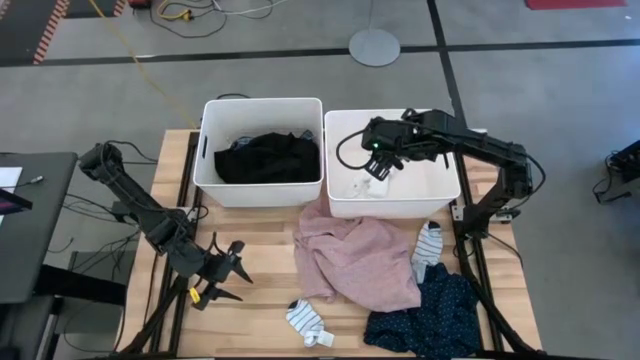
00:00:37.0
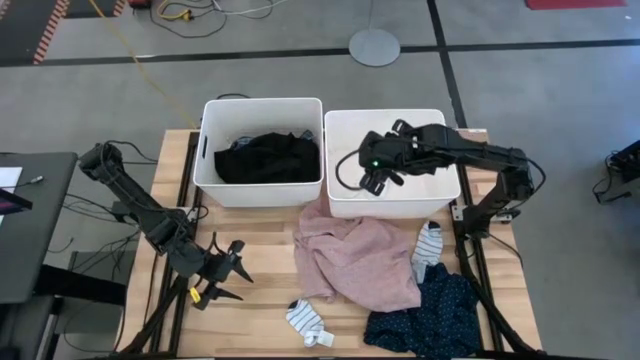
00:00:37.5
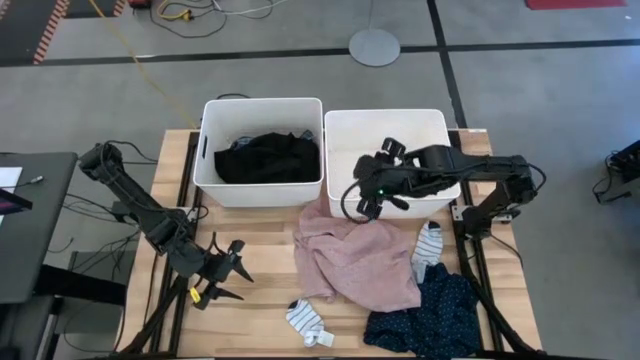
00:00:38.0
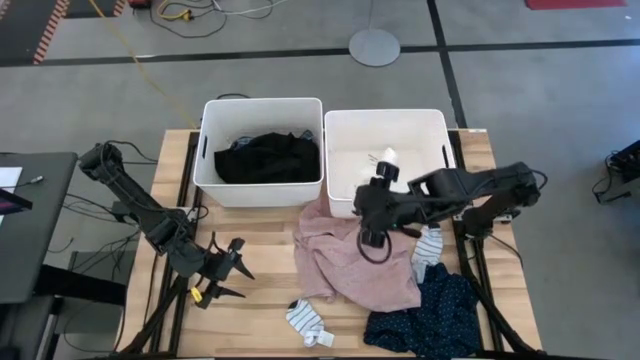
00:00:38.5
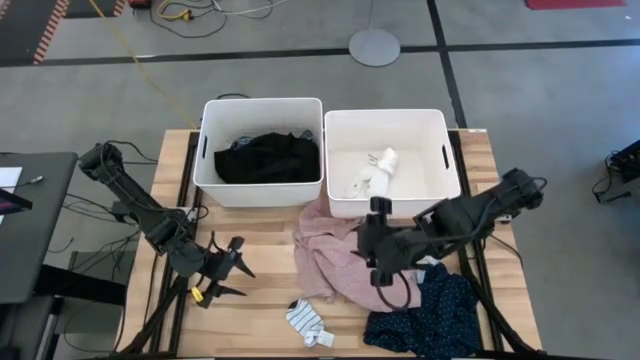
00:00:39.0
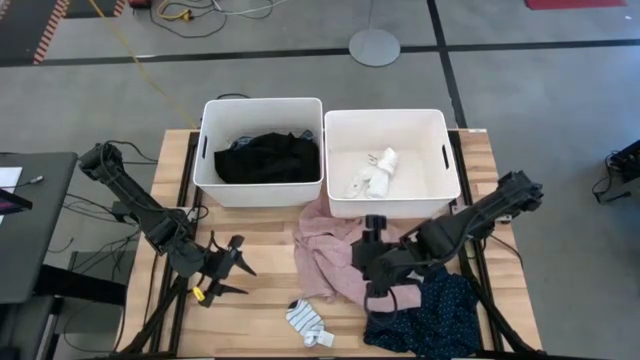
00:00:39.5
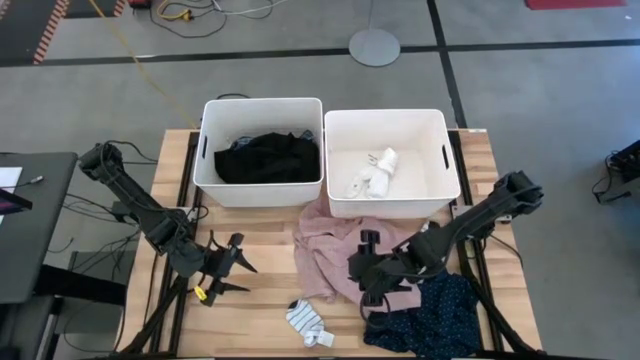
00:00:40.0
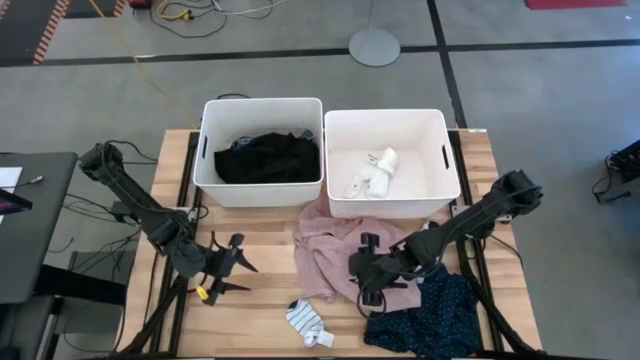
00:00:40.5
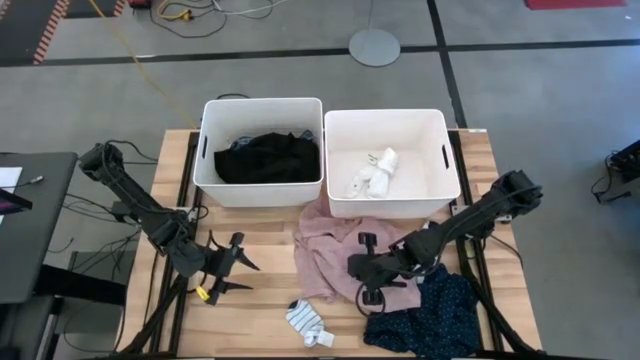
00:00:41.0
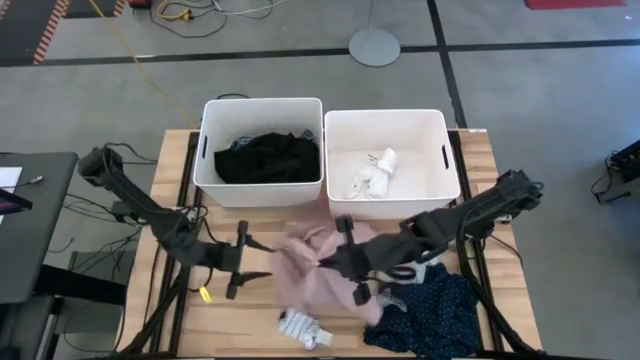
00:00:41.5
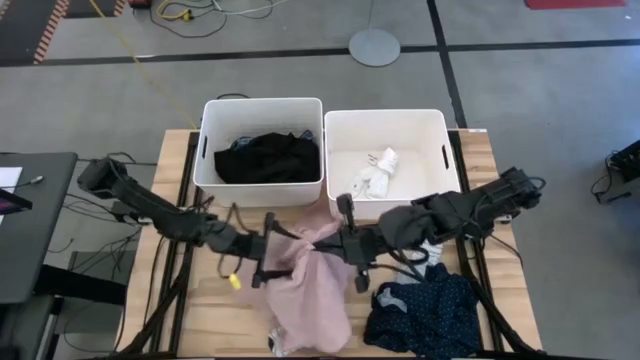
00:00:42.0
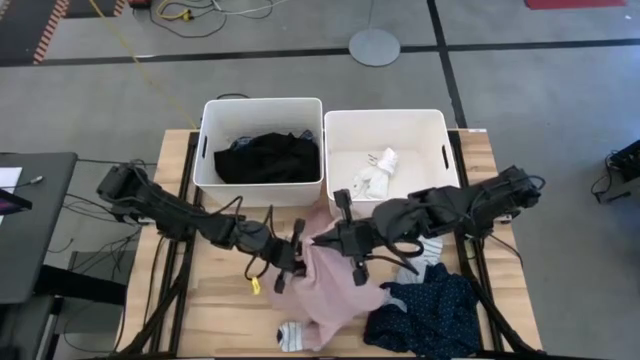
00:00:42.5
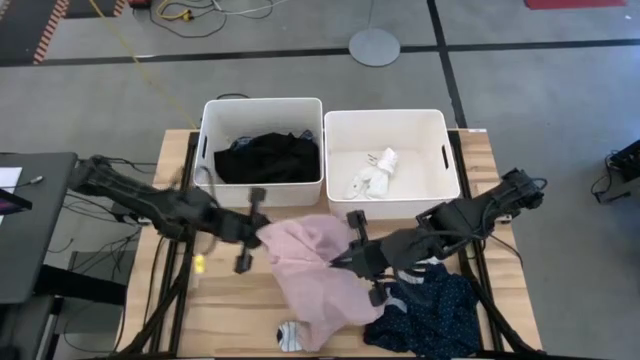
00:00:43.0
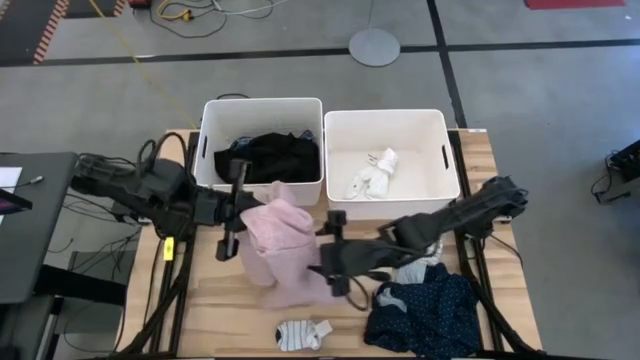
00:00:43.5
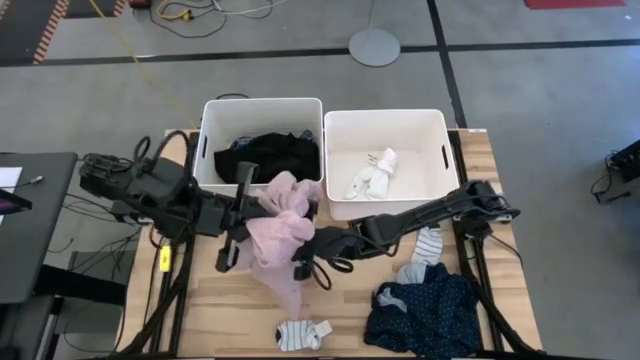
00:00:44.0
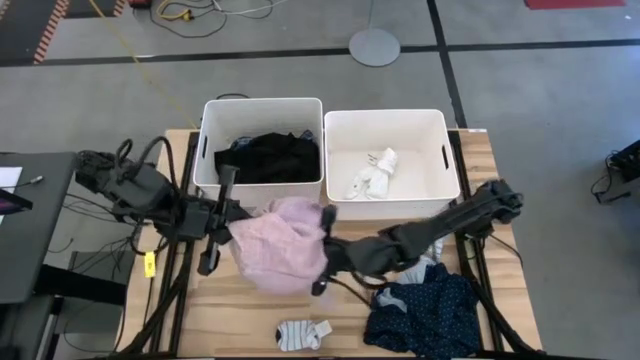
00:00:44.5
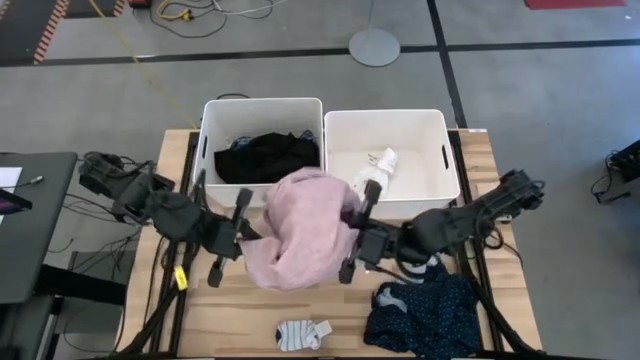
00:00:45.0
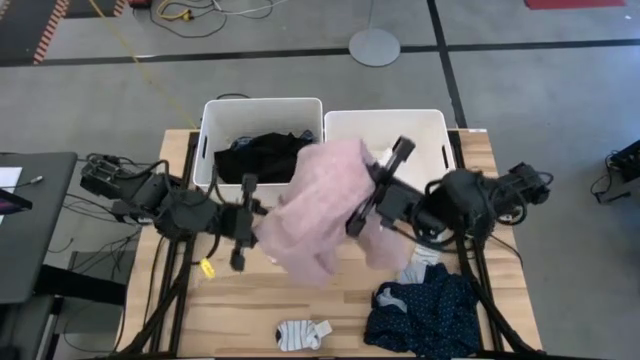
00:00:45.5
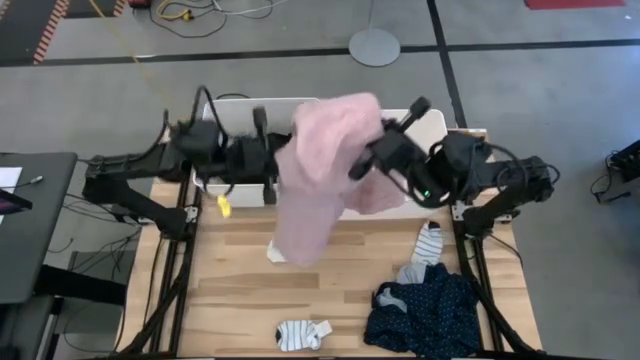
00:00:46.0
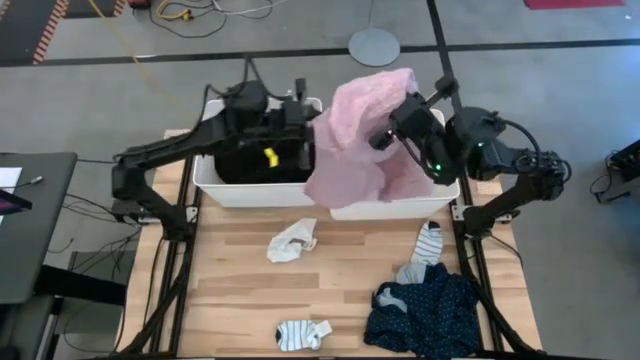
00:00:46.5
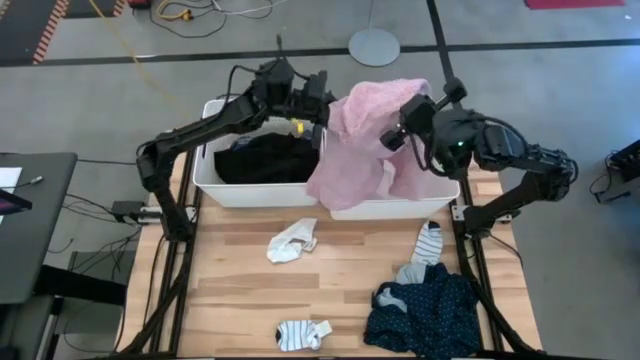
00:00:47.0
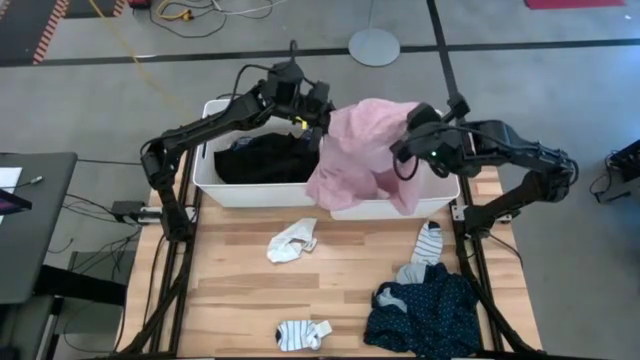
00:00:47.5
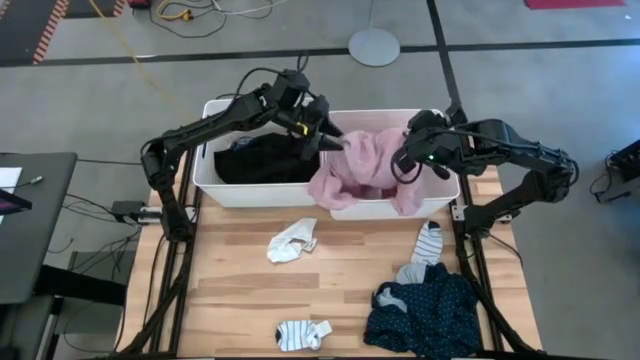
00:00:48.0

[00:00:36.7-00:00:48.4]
Task: Sort clothes
Put the pink shirt into the right white laundry organizer

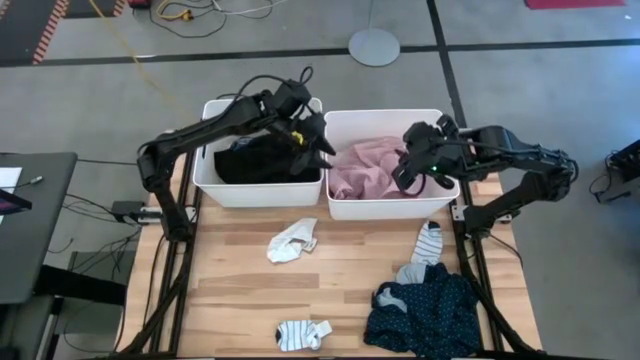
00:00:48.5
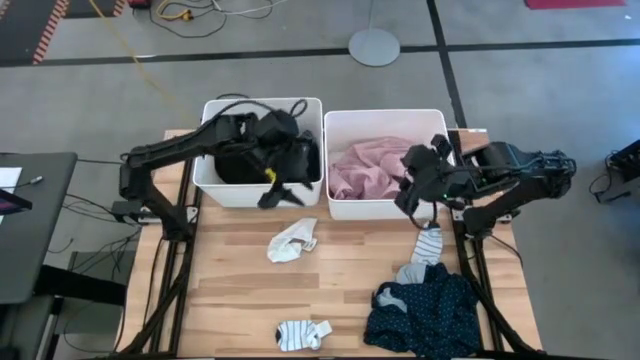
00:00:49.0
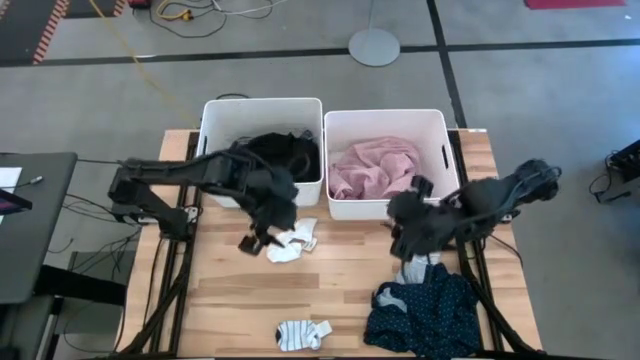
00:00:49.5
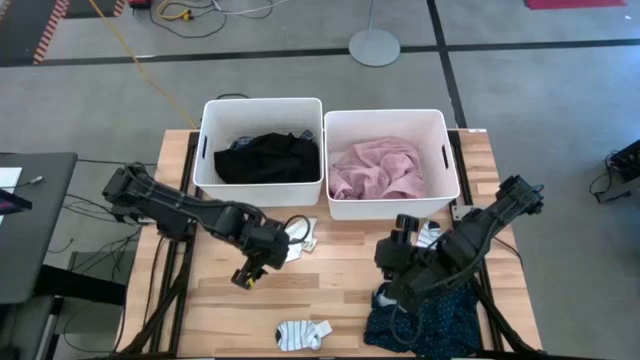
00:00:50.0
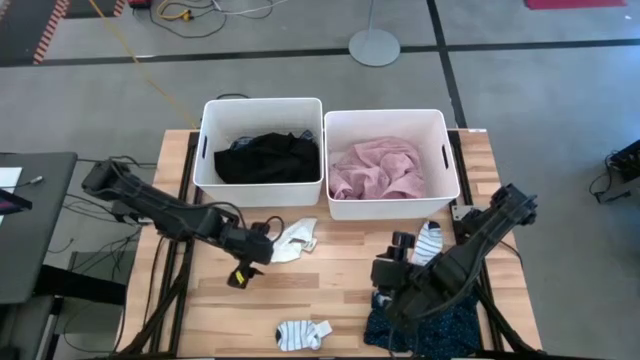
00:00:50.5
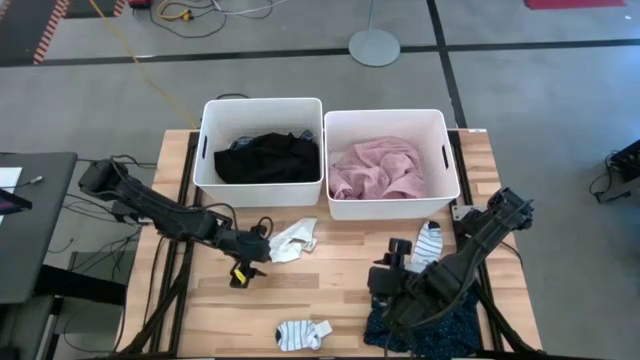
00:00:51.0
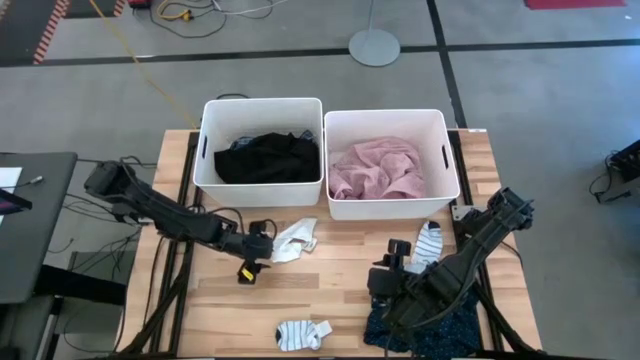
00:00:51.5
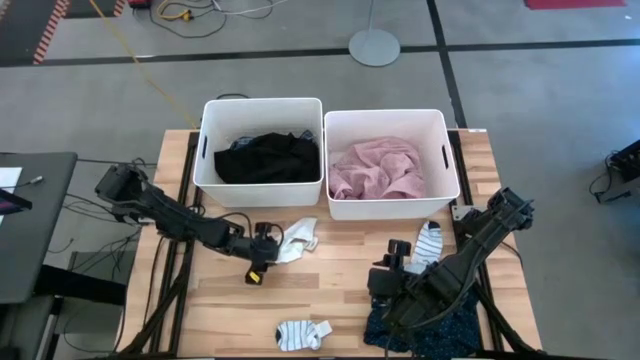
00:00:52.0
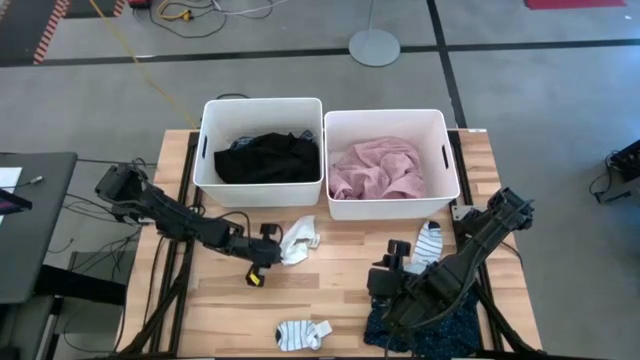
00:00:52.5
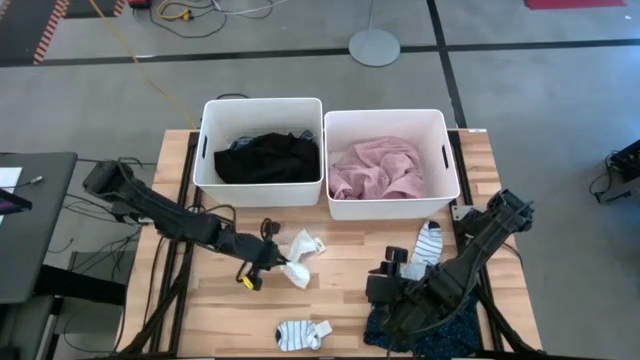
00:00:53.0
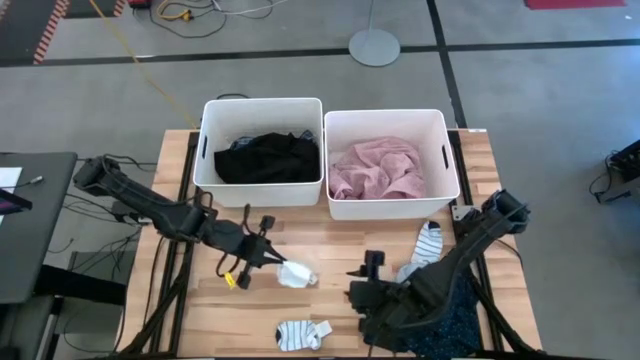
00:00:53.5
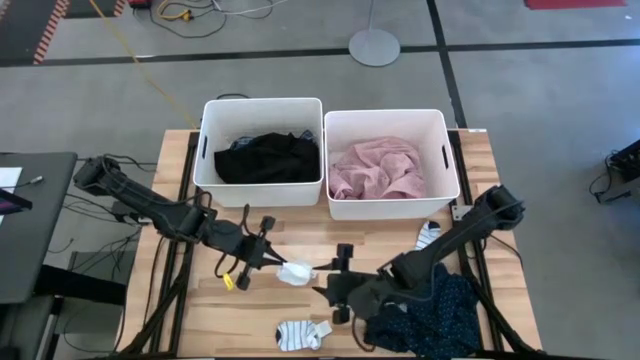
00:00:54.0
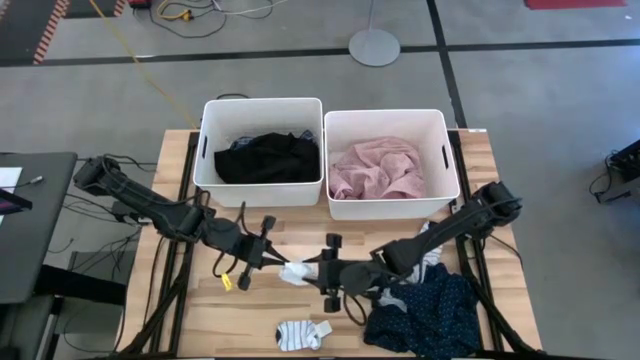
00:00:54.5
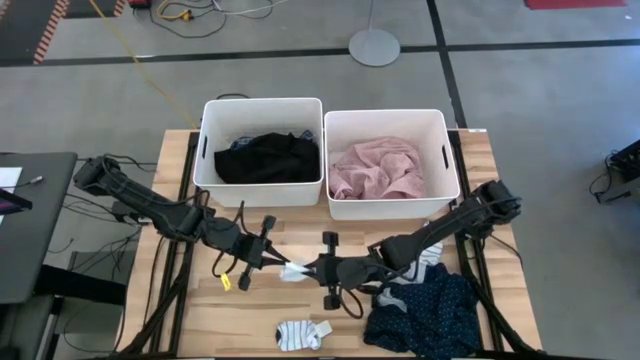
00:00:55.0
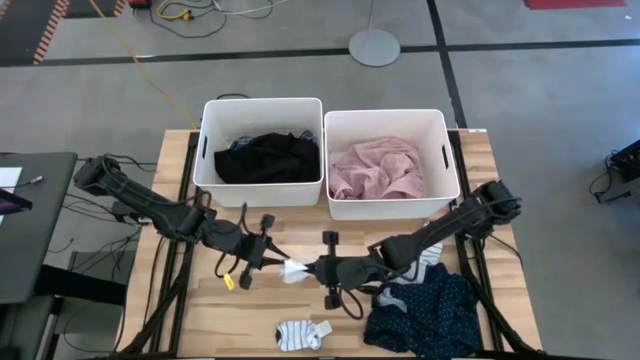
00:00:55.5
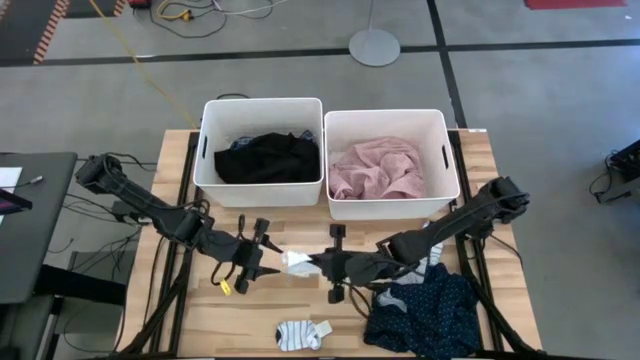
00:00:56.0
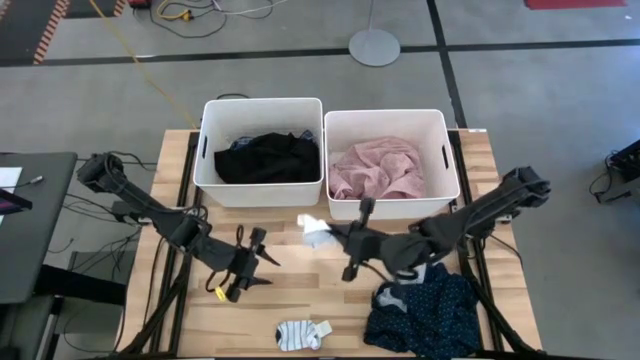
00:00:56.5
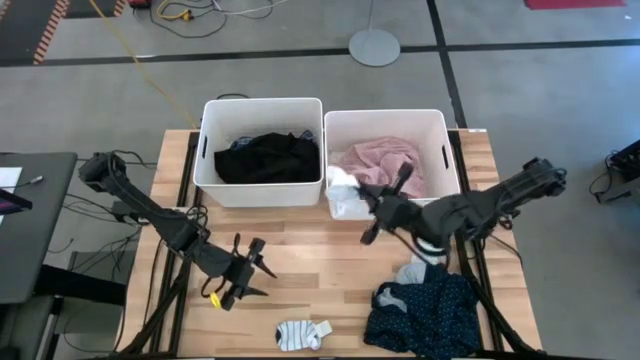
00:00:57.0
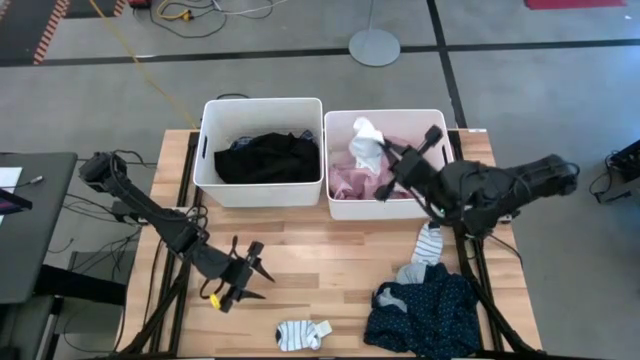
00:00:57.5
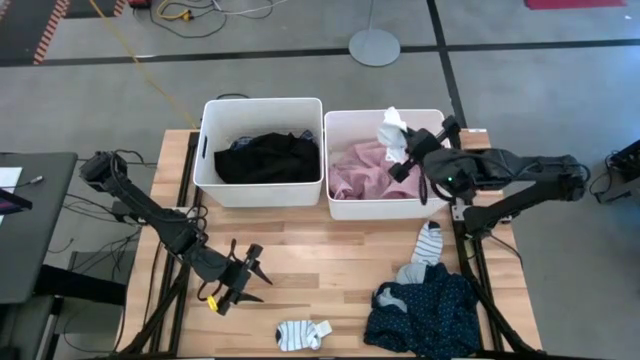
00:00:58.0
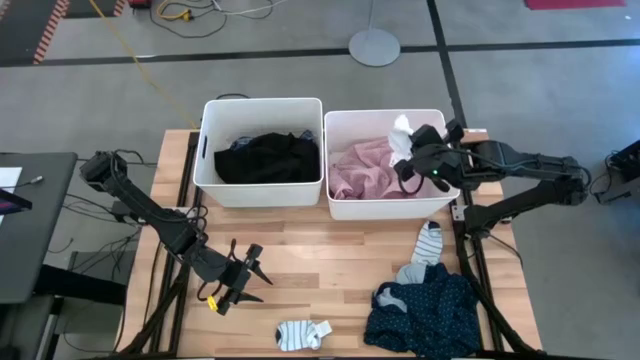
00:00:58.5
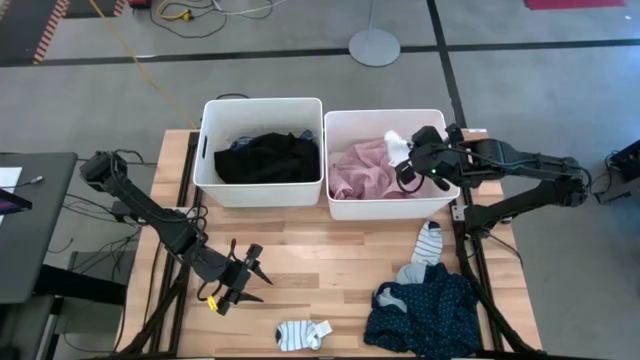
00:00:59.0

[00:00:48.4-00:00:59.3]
Put the white sock into the right white laundry organizer
